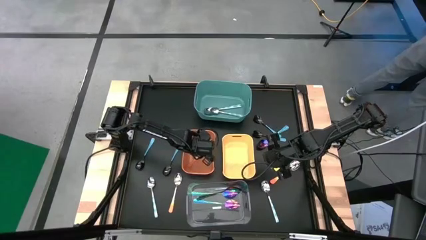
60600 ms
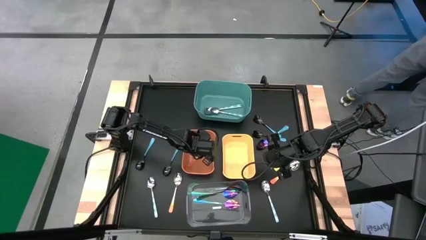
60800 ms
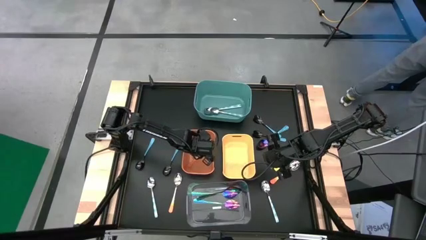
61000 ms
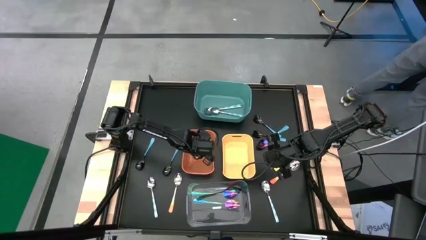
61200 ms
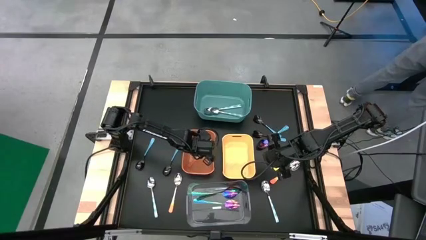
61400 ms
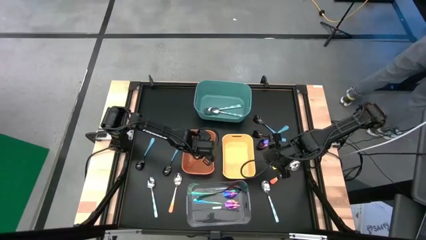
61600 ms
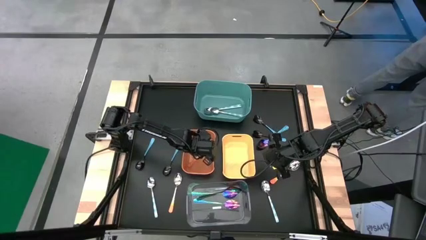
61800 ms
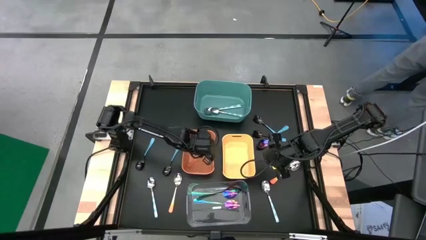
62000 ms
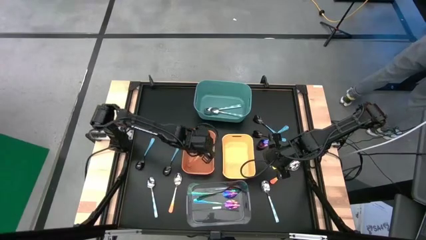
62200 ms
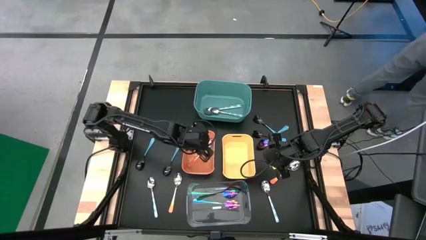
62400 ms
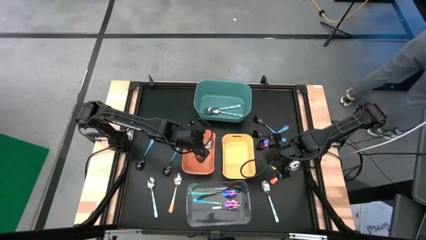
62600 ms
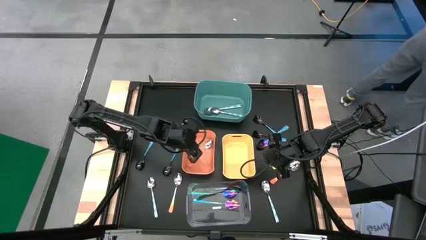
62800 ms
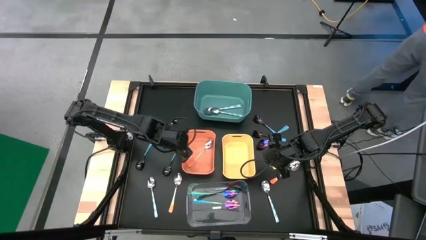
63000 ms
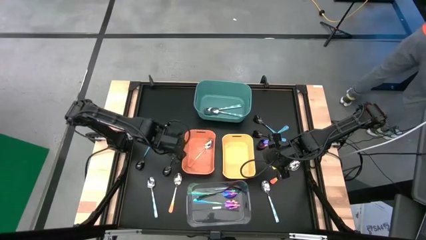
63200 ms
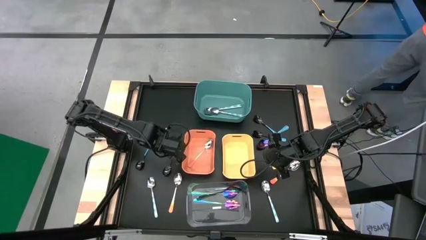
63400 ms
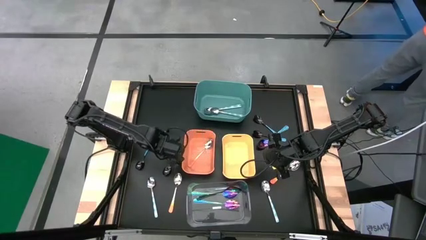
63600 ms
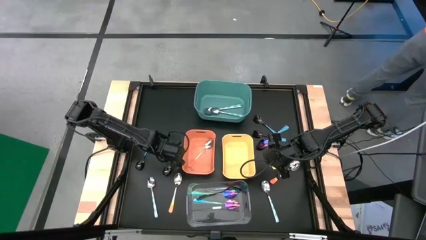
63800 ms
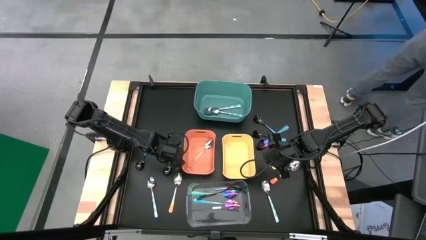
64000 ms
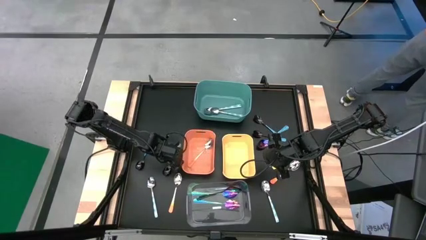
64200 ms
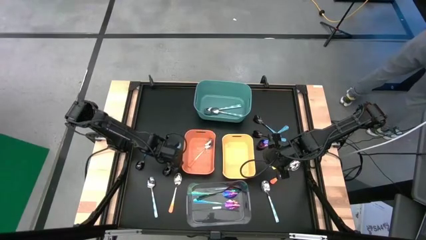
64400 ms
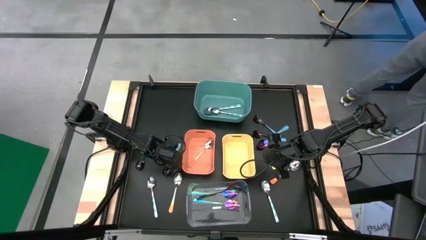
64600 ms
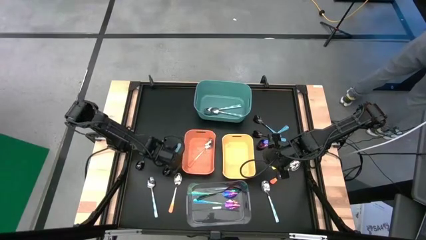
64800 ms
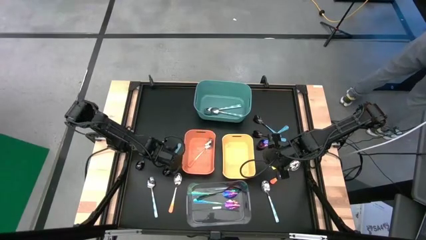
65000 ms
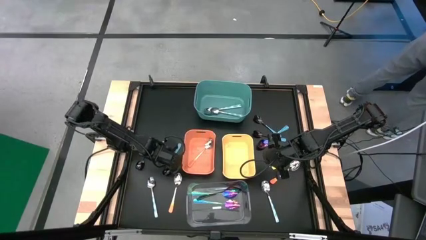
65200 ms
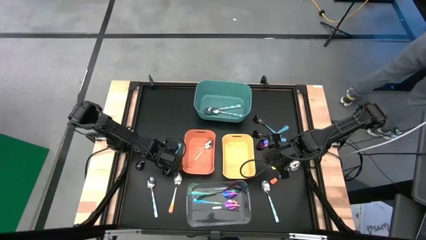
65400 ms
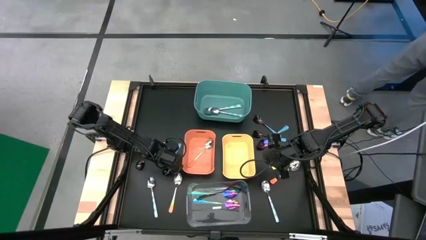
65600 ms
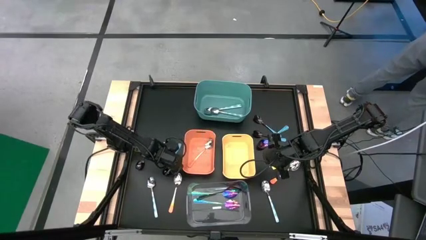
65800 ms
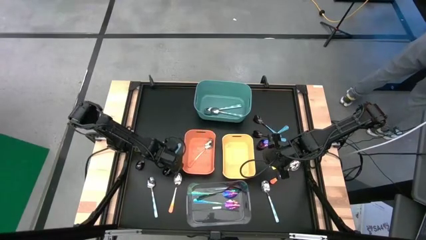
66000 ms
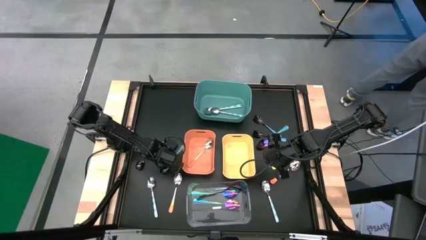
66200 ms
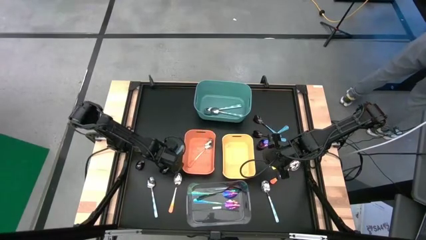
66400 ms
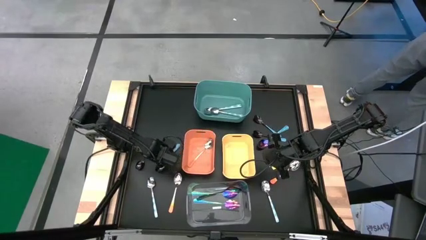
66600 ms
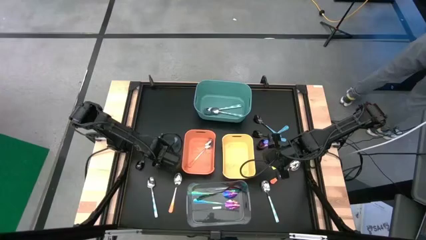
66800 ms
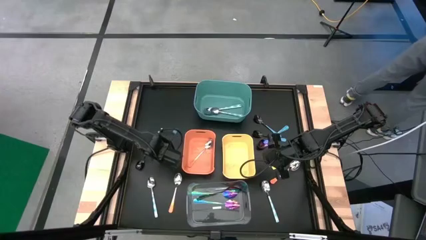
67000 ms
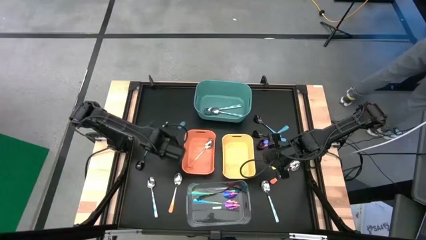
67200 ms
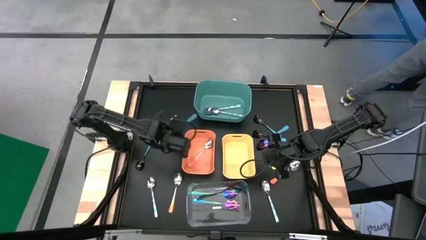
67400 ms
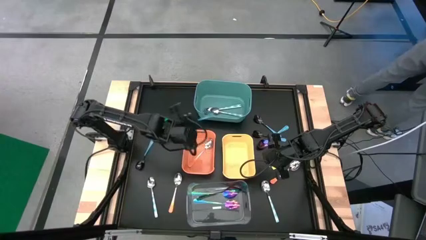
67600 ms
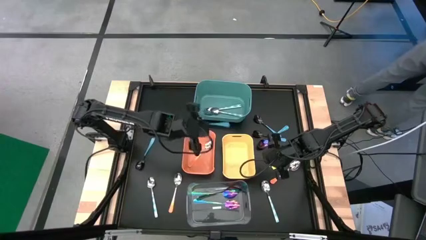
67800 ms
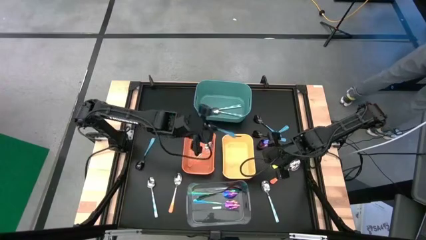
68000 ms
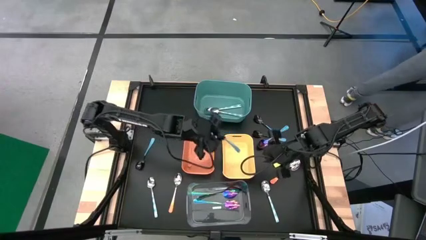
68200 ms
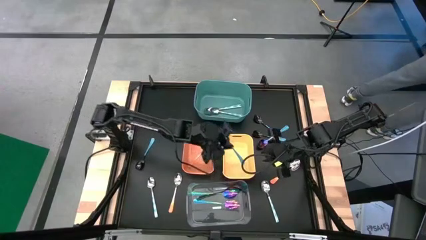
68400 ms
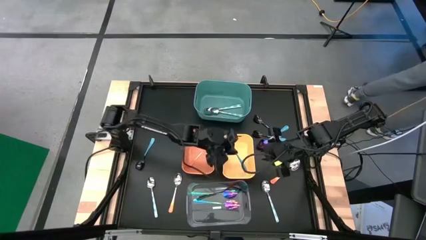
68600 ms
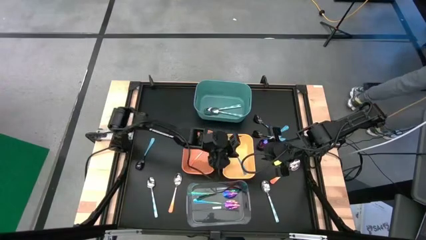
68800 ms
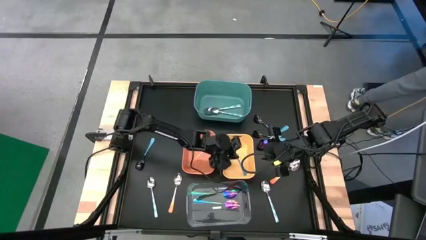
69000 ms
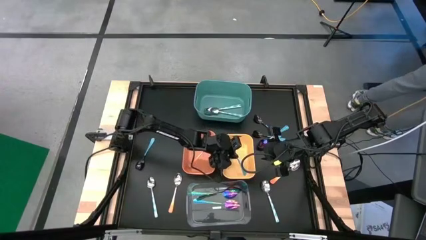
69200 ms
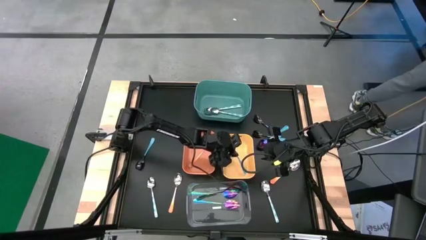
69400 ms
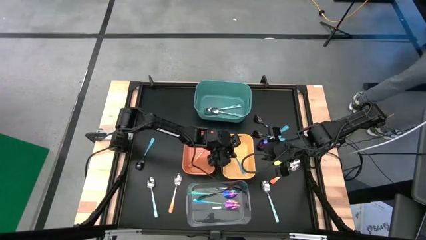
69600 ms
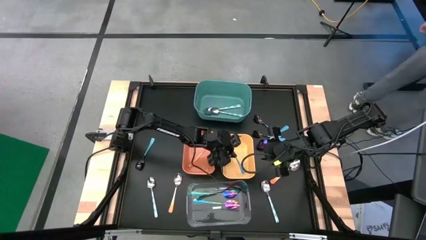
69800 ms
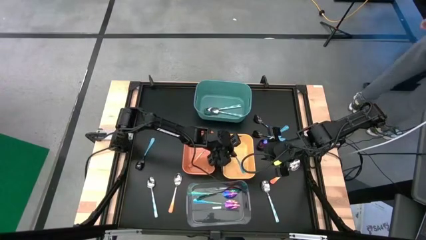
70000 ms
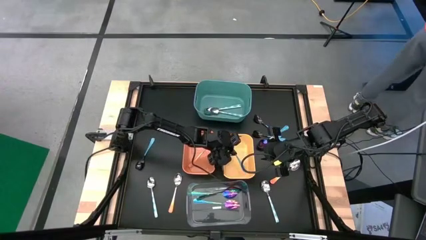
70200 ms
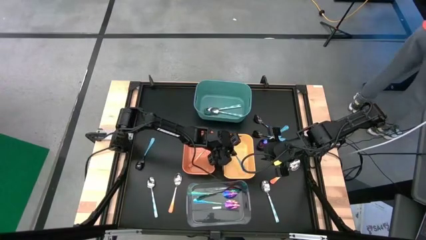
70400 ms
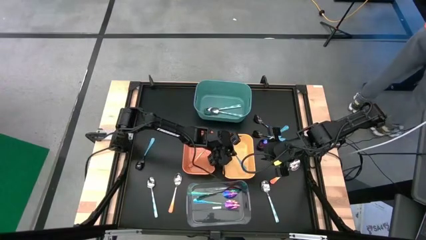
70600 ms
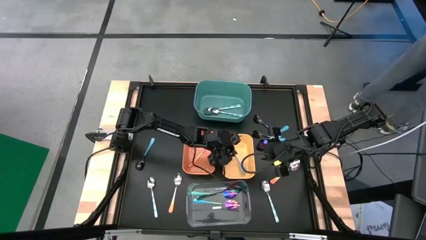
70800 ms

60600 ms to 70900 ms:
Task: Sort silverware by color (type)
Put the light blue spoon into the yellow bin
